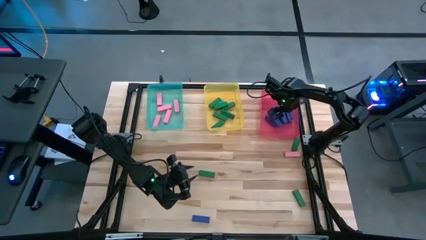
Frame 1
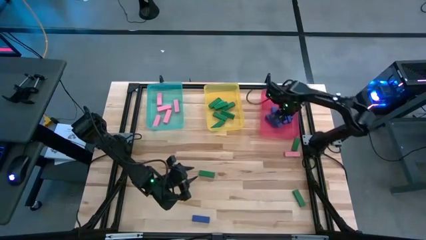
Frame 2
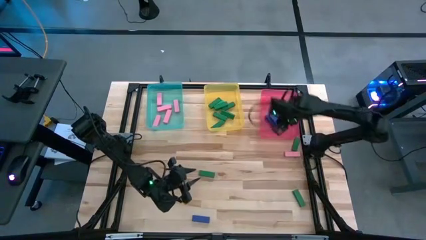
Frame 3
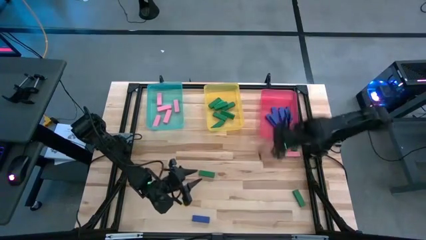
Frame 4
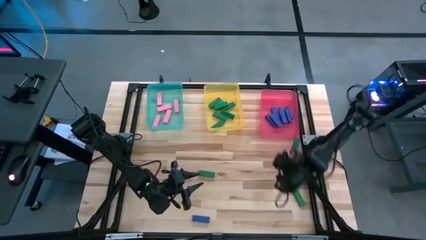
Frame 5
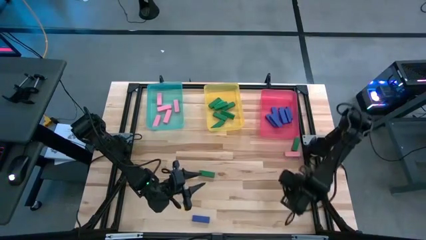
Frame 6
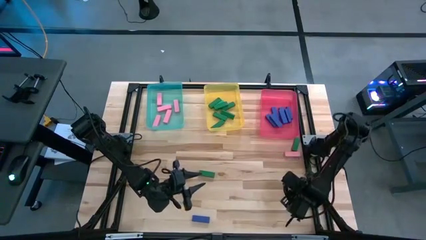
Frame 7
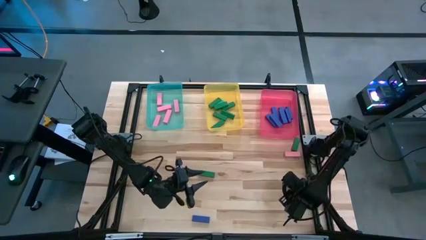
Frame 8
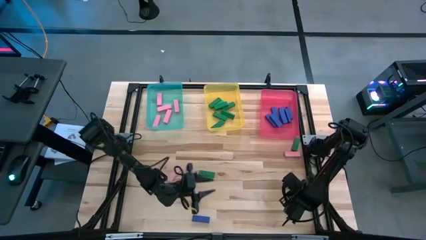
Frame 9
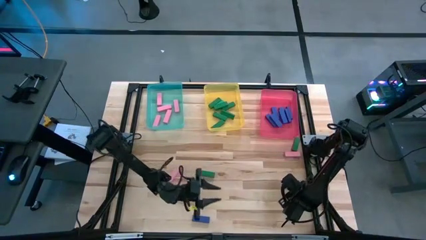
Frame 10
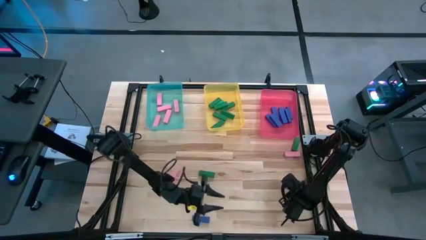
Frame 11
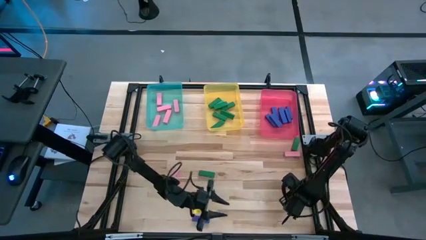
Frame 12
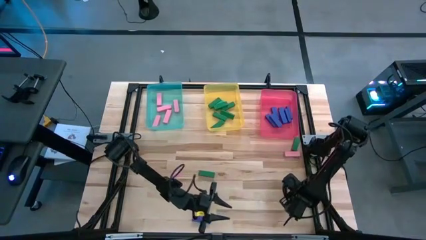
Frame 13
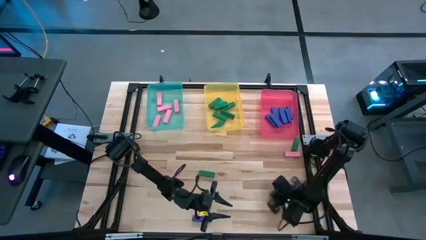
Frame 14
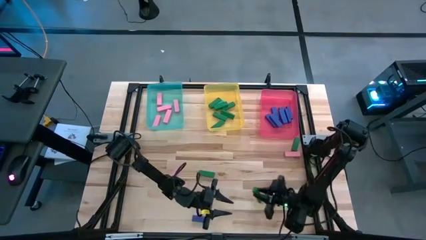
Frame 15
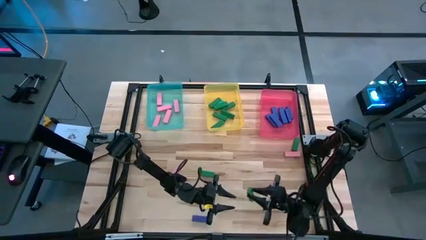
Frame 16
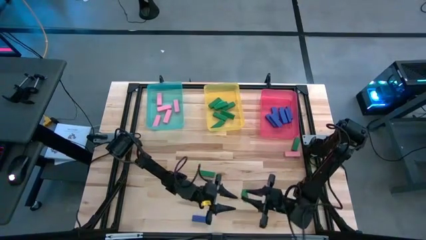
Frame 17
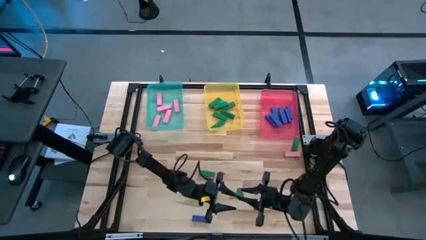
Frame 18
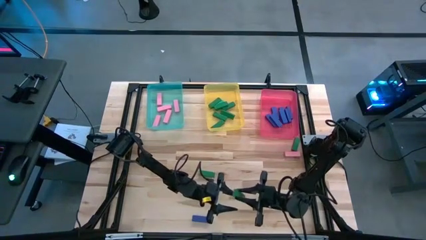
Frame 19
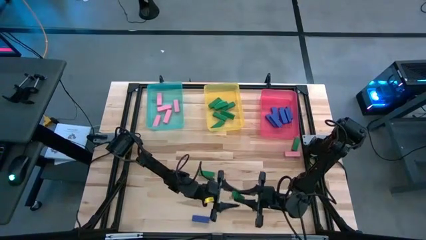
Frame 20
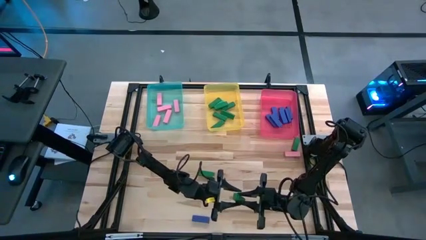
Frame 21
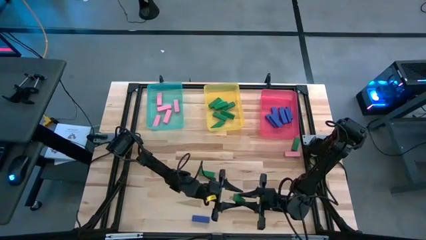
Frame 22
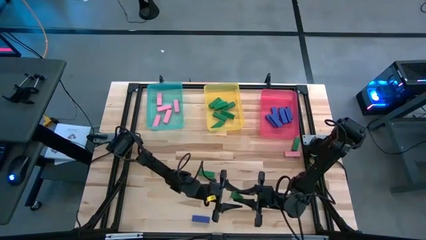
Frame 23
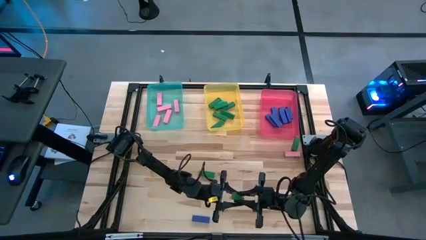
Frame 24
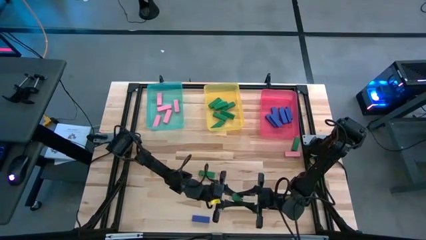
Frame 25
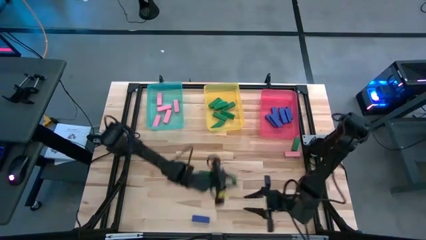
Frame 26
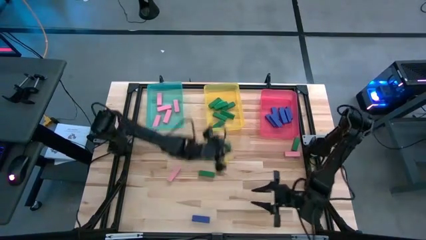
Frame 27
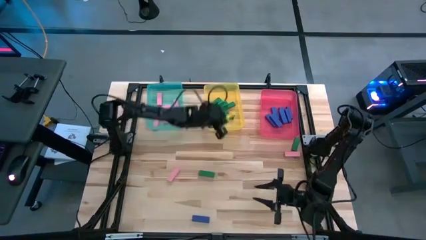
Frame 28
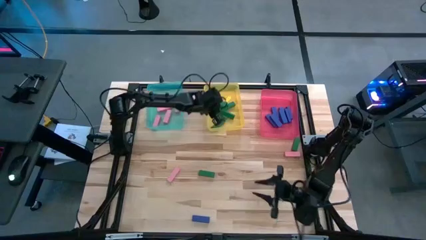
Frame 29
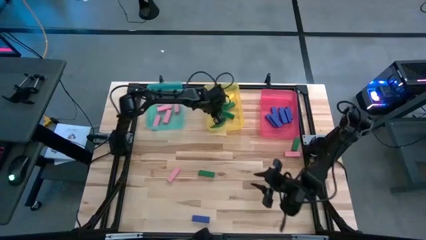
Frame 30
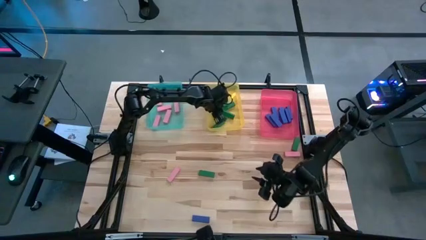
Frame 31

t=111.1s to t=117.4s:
Task: Sort blocks
Put the green wooden block into the yellow bin

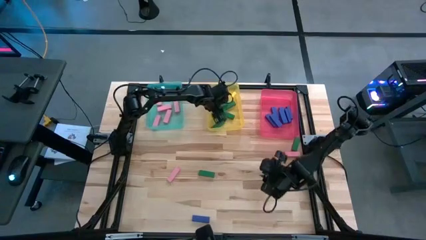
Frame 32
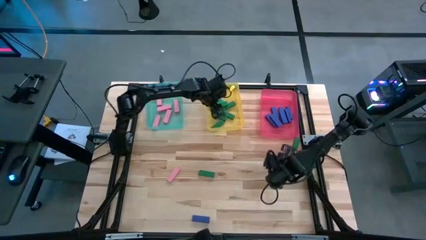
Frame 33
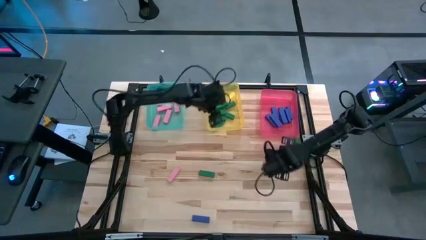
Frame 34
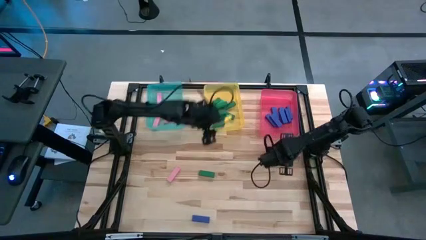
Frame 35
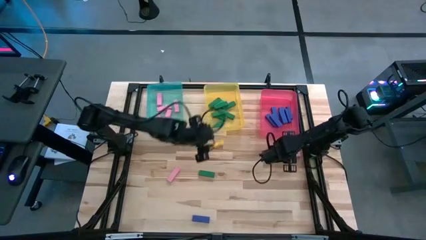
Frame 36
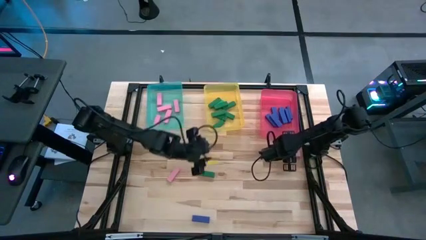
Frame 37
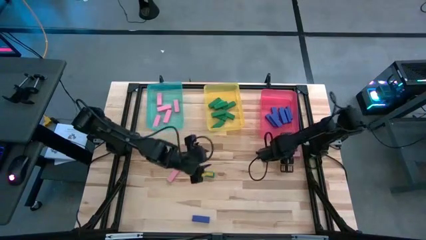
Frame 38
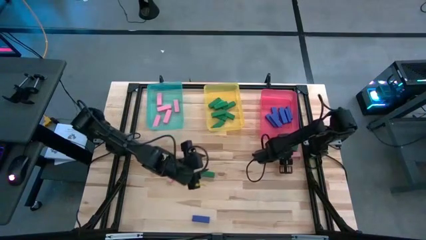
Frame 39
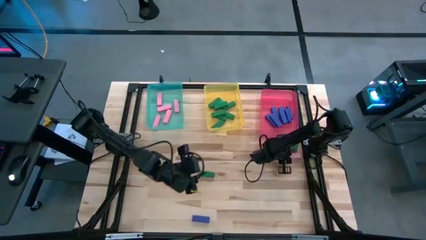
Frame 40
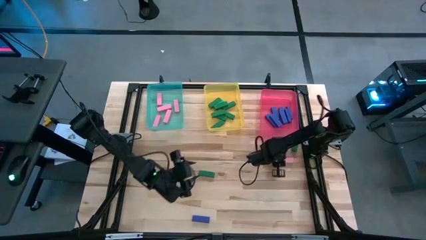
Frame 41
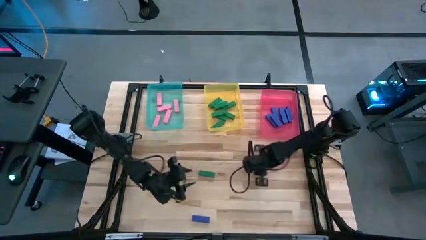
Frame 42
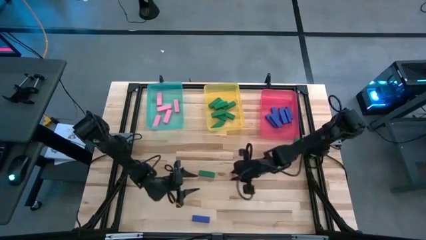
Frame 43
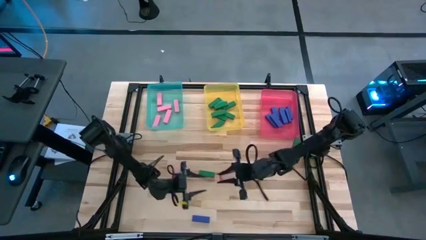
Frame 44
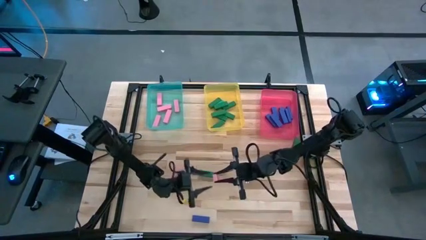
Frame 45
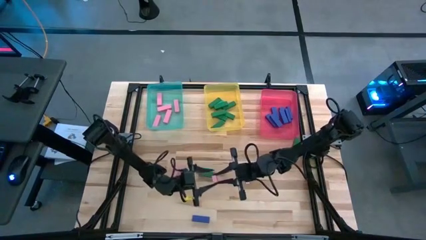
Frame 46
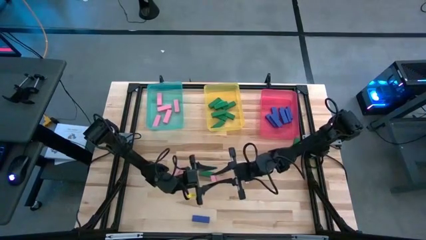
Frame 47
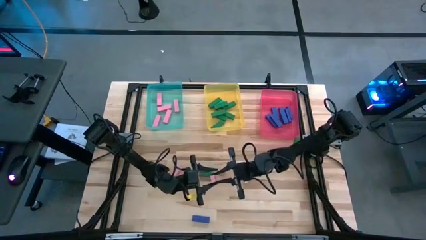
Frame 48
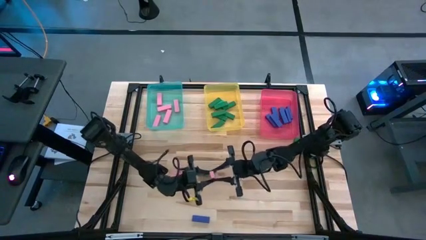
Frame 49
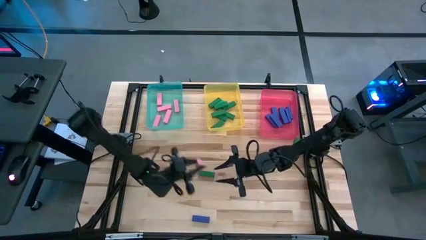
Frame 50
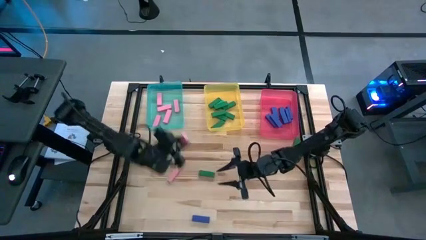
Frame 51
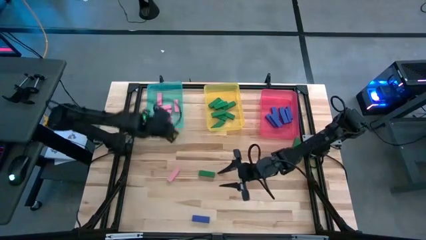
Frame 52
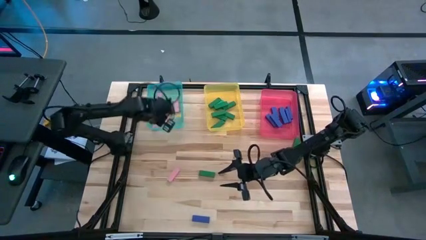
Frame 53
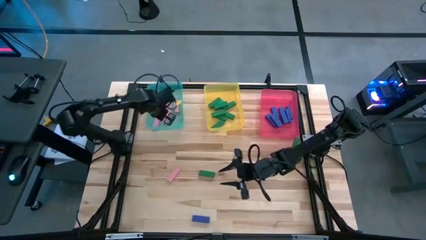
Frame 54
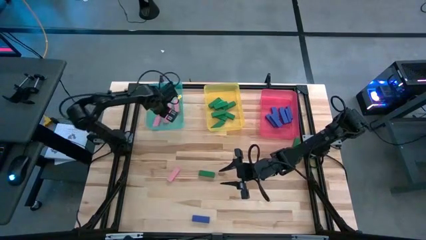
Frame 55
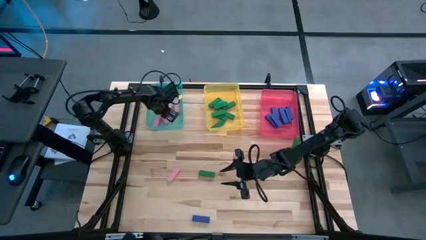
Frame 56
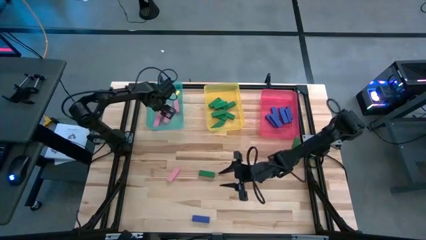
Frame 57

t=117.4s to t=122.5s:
Put the pink wooden block into the blue bin

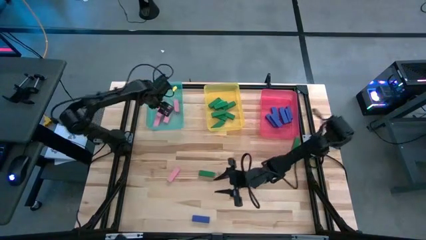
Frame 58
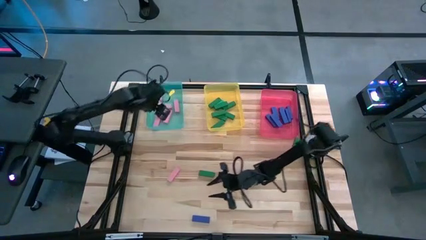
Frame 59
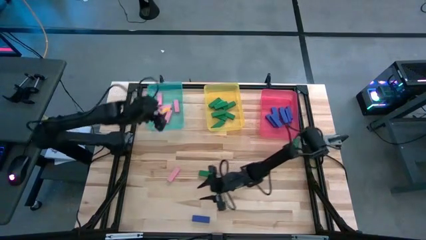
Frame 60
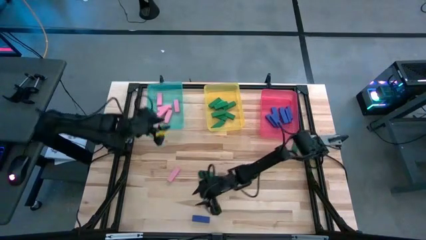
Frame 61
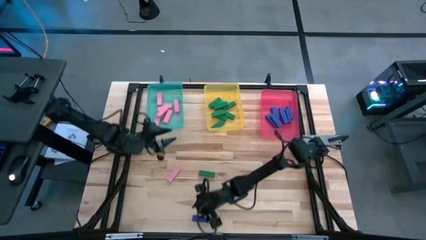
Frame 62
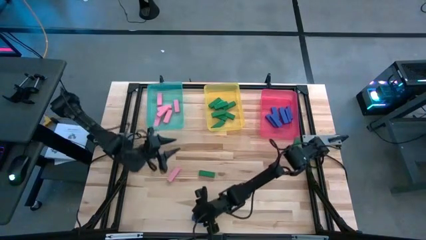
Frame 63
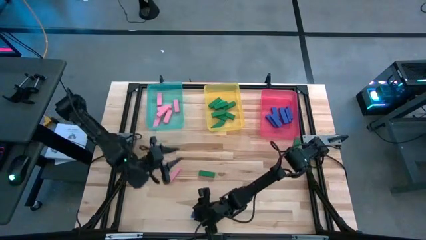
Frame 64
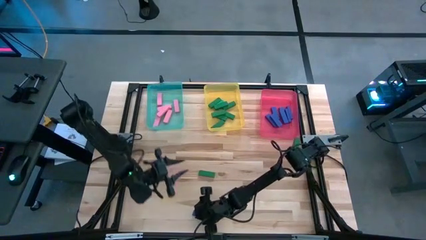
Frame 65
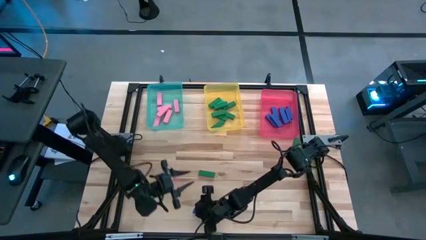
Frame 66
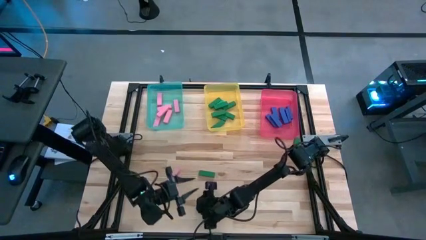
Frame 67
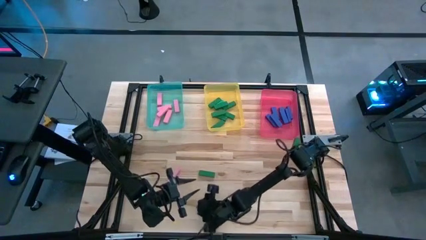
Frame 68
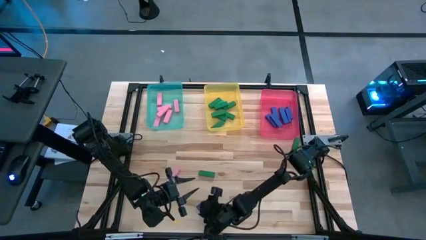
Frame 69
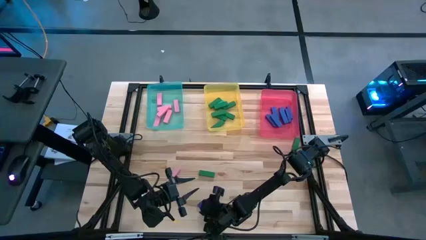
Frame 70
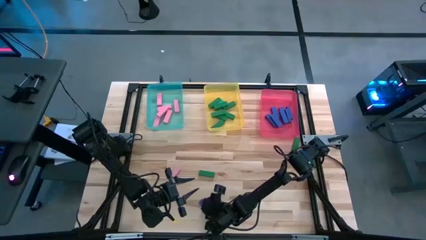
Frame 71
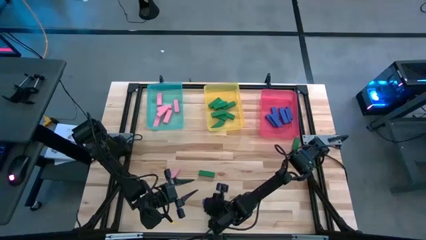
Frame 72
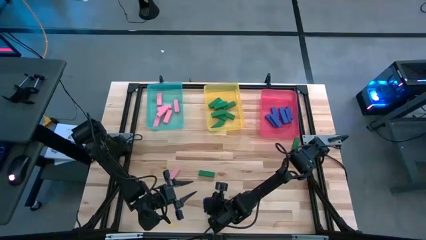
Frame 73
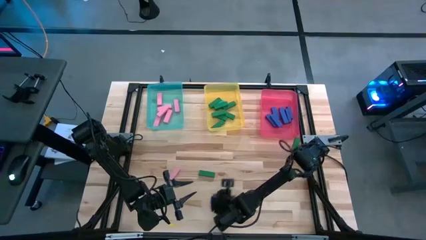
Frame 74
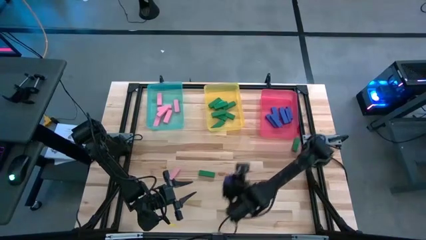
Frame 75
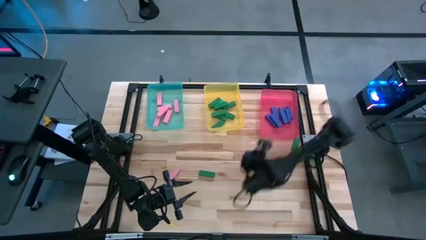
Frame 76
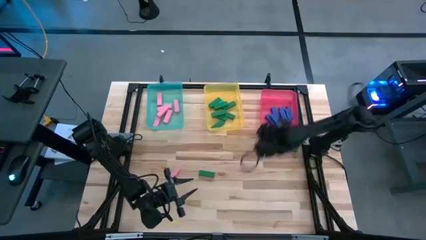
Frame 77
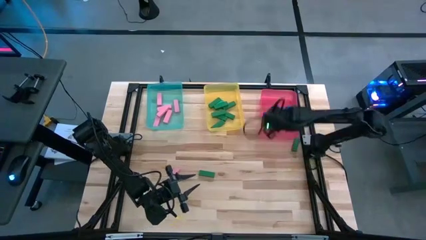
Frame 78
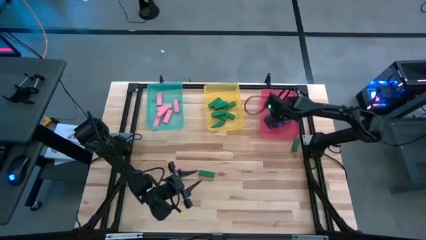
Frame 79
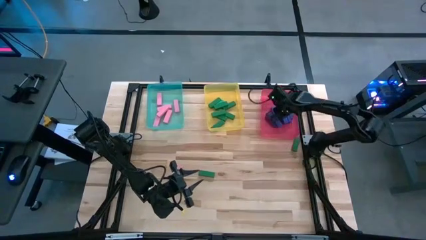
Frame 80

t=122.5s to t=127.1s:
Put the blue wooden block into the red bin
